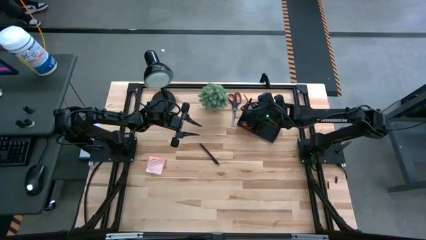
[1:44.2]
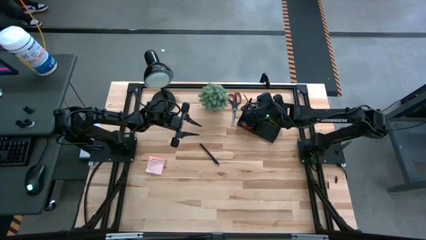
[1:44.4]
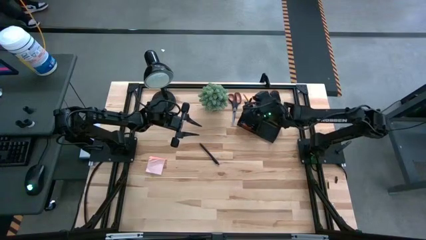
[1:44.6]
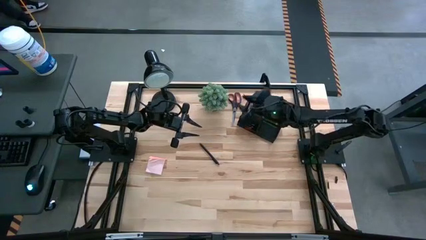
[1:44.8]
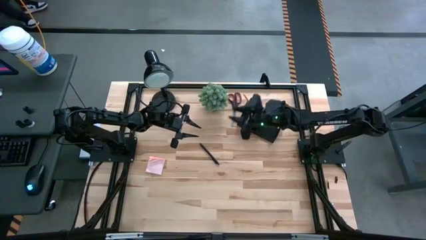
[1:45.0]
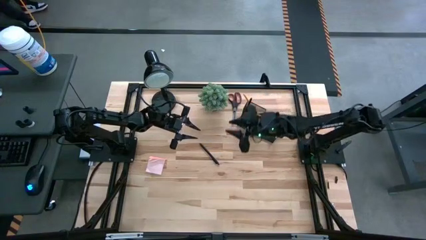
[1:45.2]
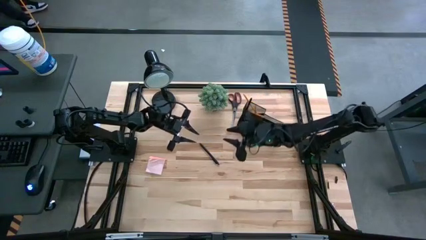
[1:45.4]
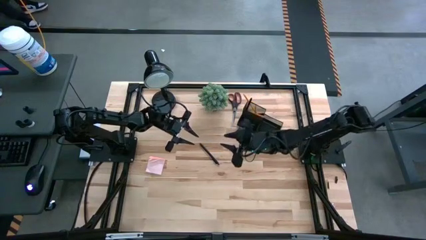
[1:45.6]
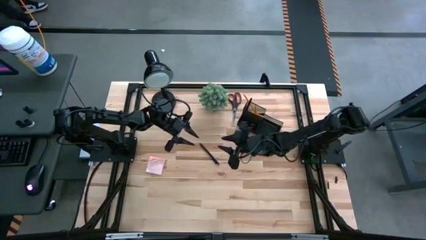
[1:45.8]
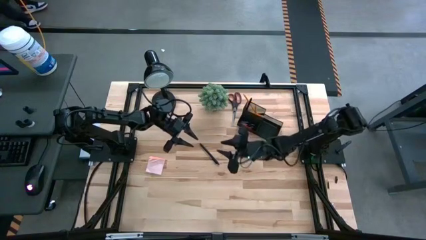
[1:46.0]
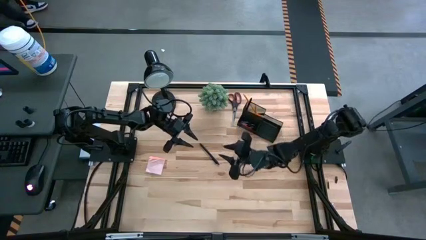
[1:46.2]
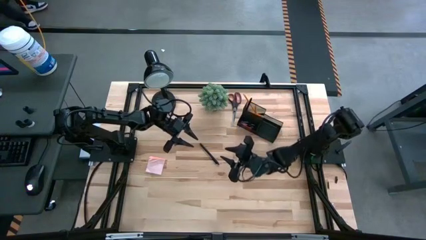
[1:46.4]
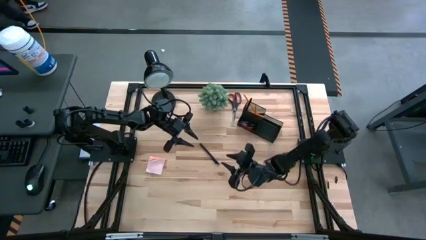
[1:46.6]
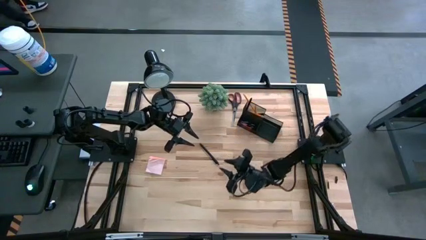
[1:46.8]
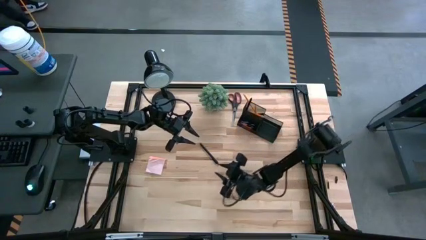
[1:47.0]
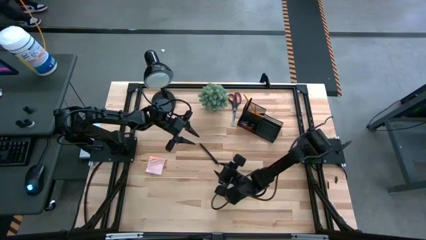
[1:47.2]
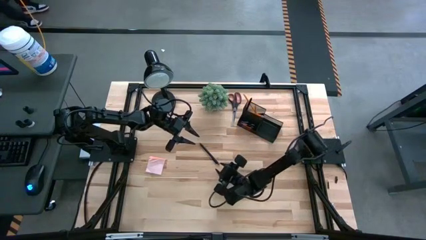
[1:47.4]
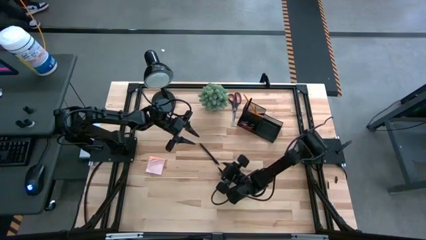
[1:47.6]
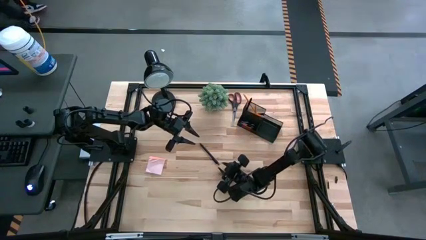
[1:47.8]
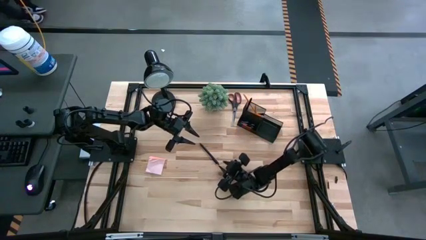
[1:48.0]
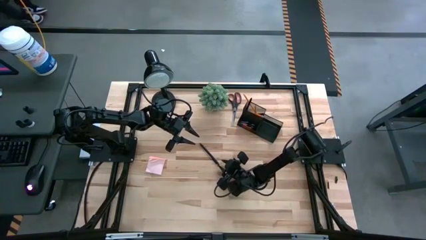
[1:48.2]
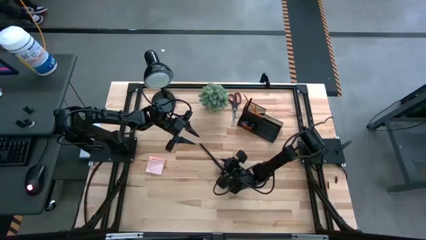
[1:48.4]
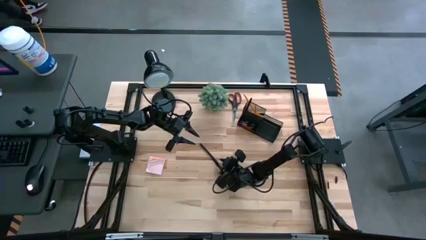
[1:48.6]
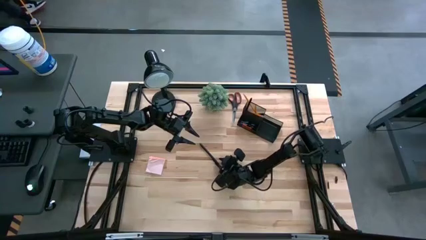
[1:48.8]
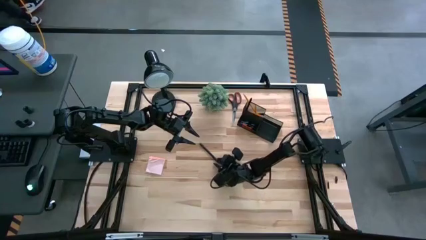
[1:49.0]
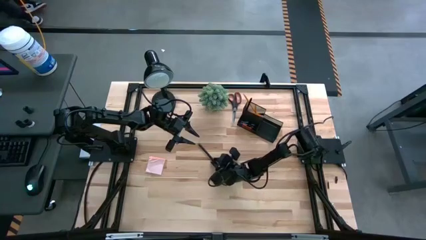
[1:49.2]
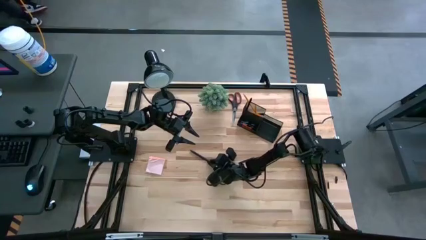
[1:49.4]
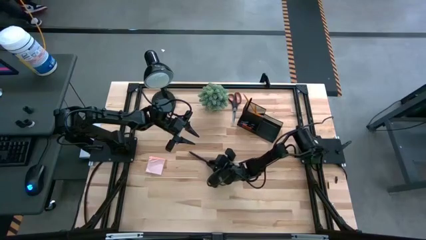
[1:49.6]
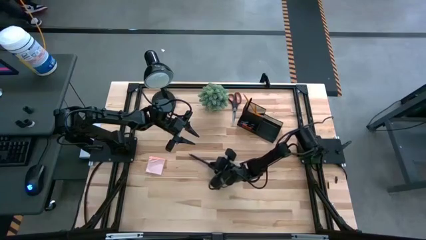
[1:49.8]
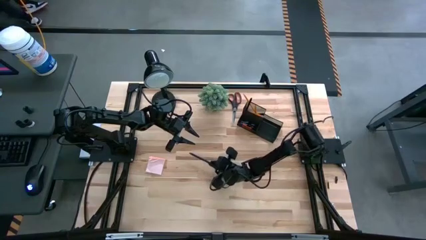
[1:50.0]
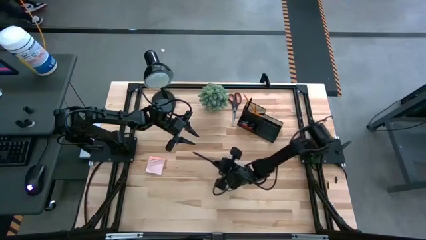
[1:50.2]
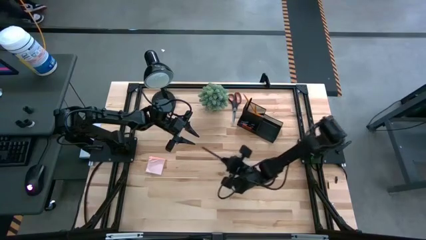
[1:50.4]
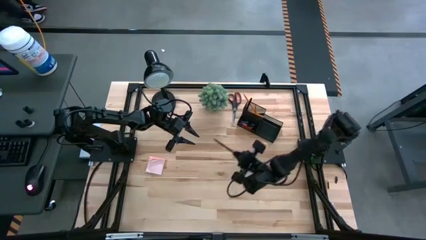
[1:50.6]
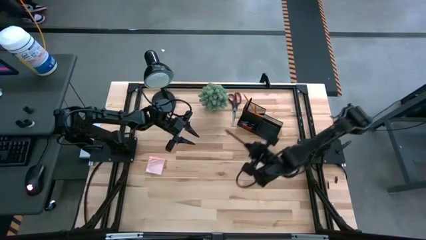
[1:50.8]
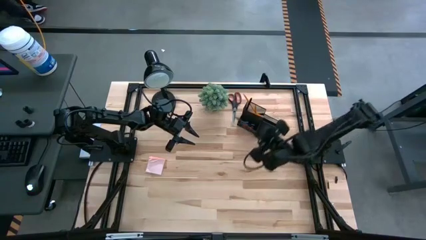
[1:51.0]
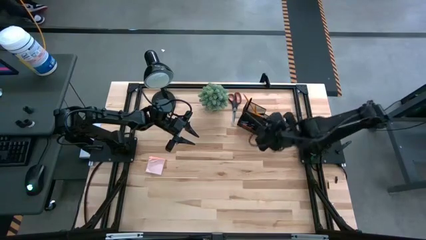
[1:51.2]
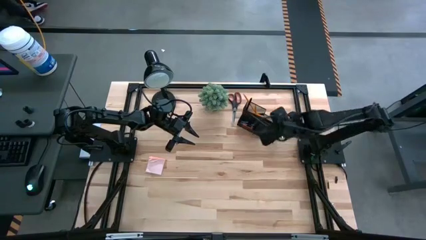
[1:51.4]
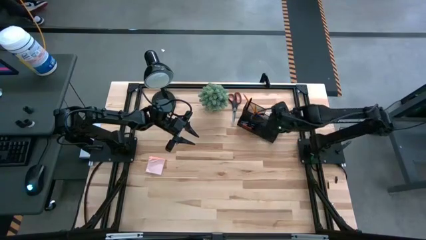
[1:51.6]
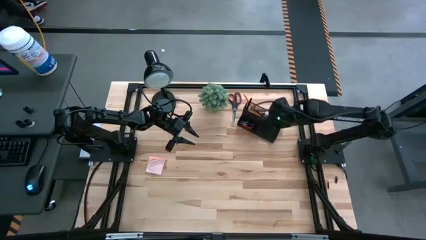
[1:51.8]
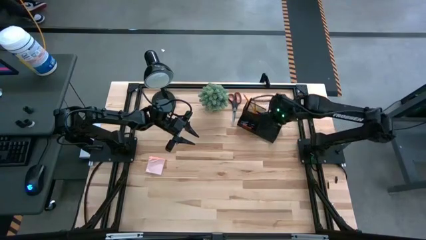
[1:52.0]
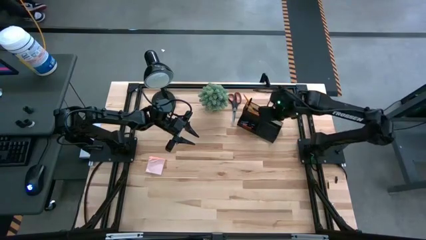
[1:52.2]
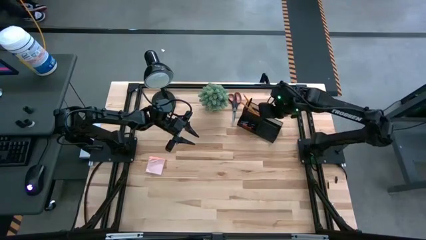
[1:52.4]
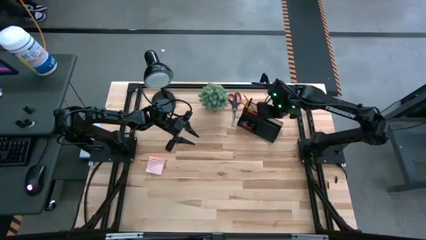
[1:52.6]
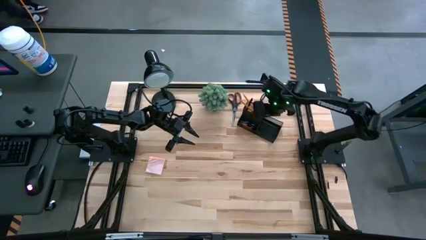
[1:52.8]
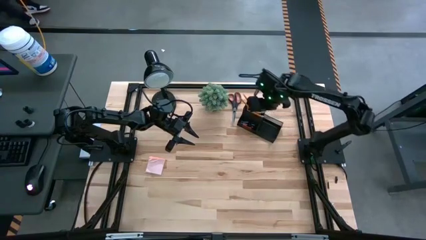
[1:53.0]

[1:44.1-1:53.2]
Task: Pick and place office supplies into organizer
Put the black pen into the black desk organizer

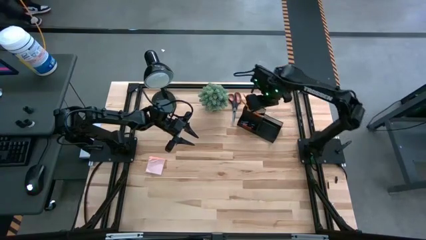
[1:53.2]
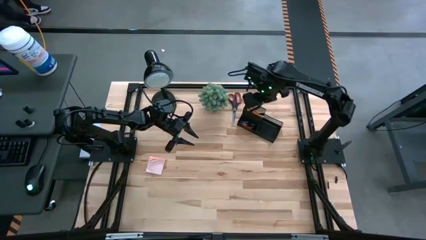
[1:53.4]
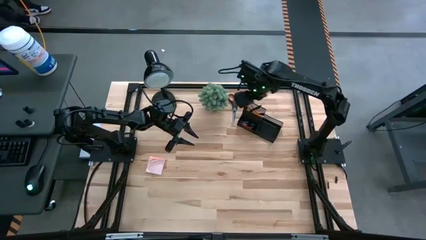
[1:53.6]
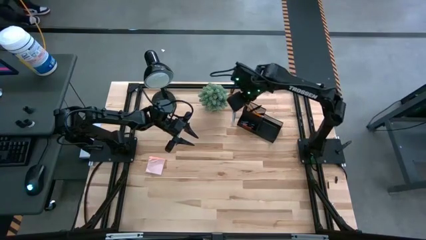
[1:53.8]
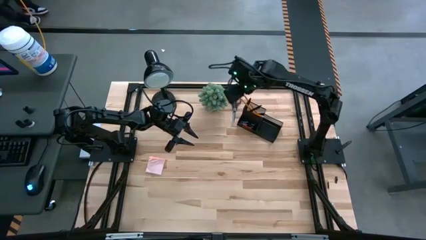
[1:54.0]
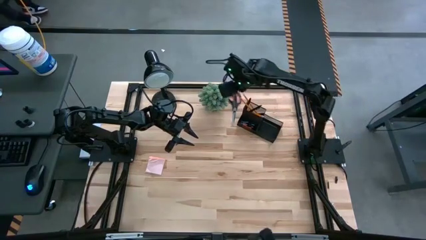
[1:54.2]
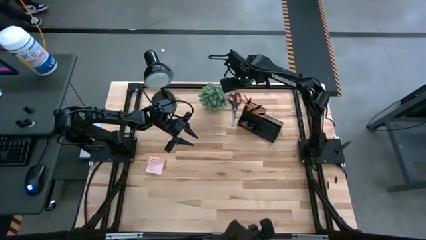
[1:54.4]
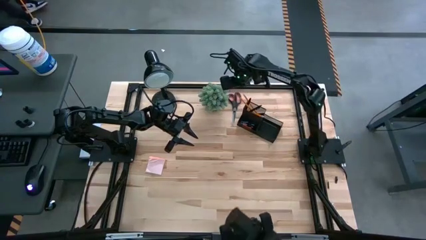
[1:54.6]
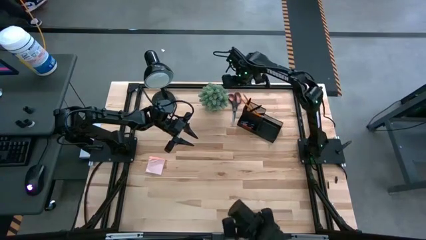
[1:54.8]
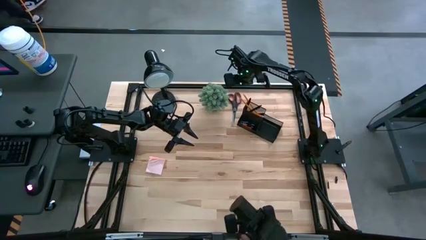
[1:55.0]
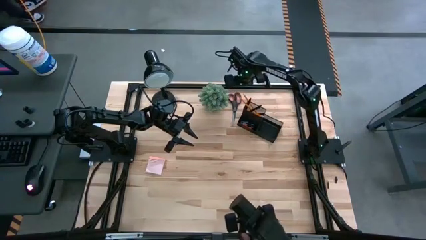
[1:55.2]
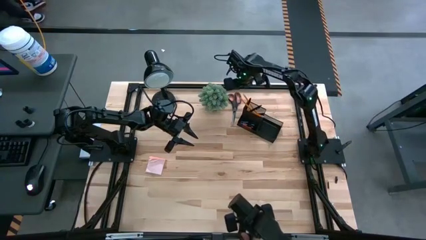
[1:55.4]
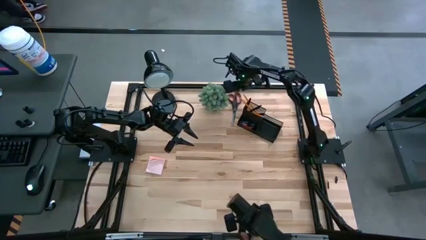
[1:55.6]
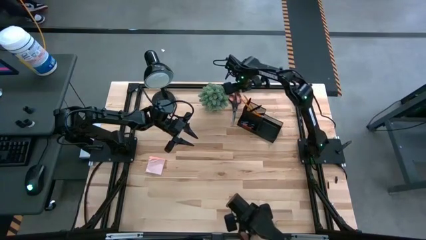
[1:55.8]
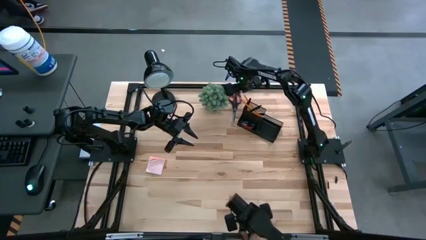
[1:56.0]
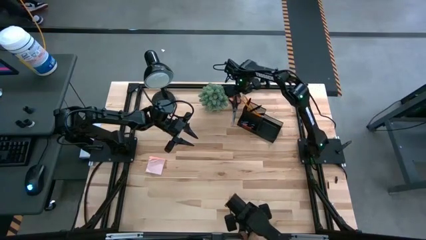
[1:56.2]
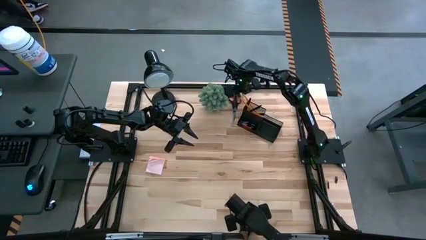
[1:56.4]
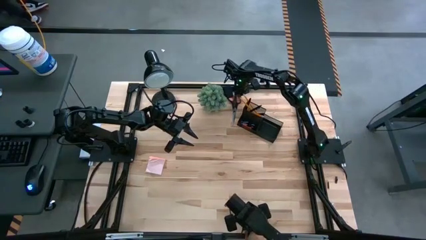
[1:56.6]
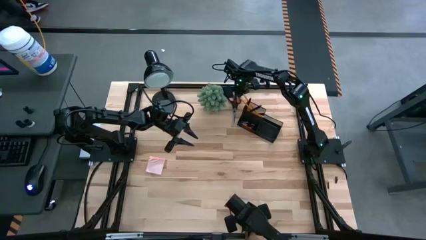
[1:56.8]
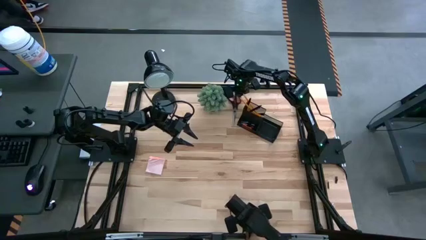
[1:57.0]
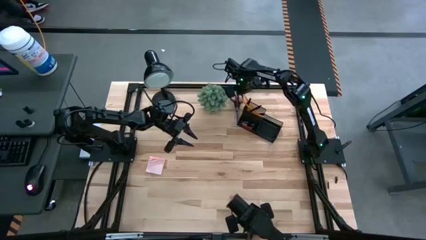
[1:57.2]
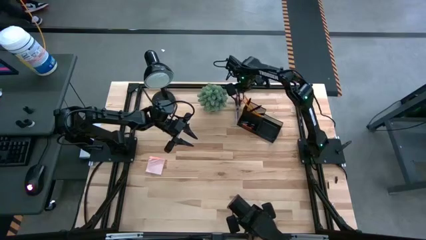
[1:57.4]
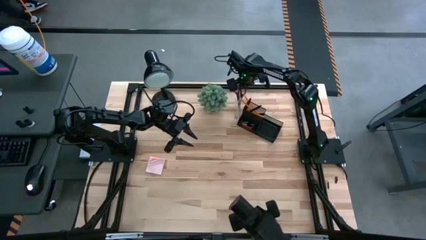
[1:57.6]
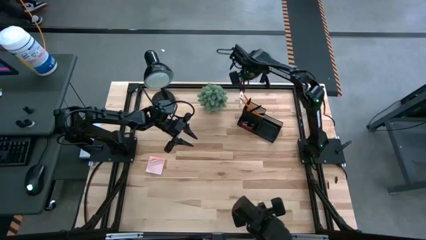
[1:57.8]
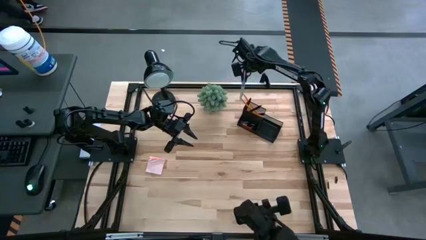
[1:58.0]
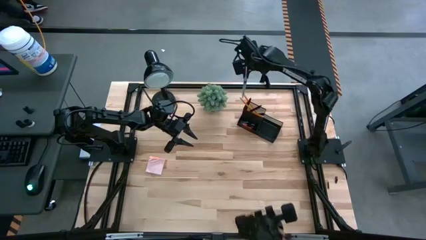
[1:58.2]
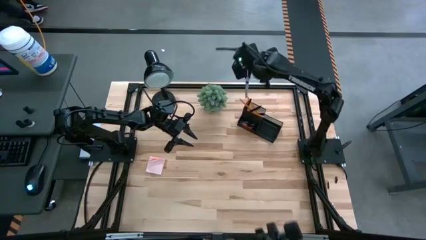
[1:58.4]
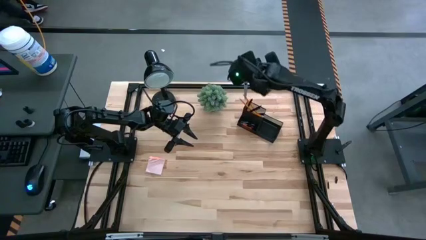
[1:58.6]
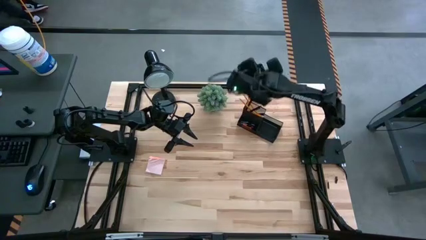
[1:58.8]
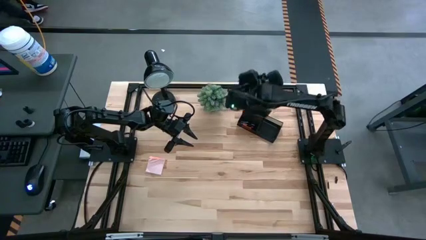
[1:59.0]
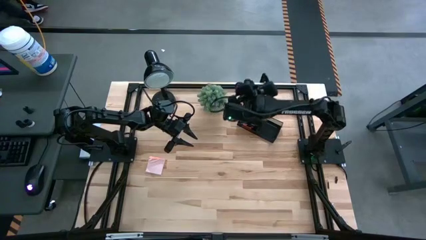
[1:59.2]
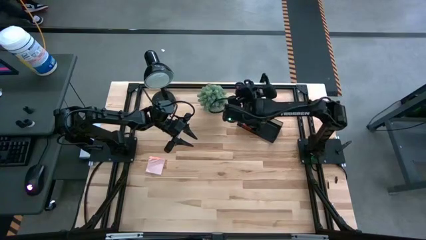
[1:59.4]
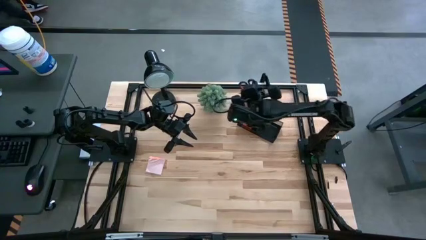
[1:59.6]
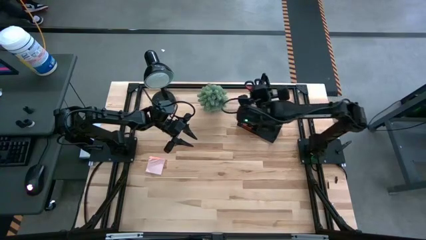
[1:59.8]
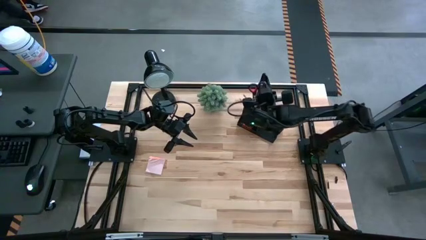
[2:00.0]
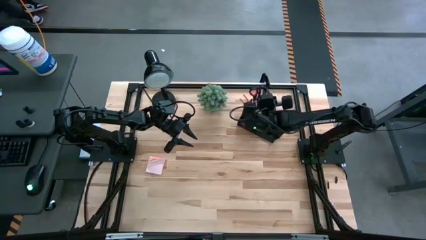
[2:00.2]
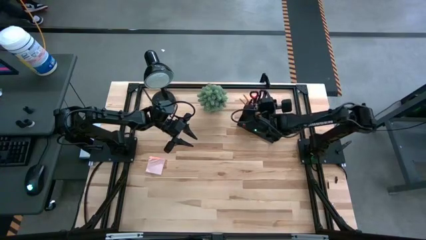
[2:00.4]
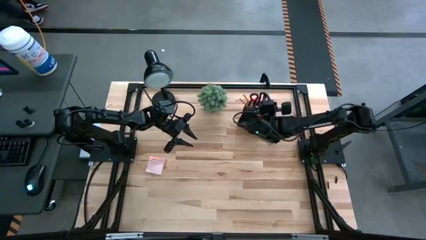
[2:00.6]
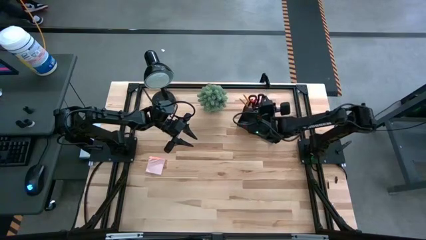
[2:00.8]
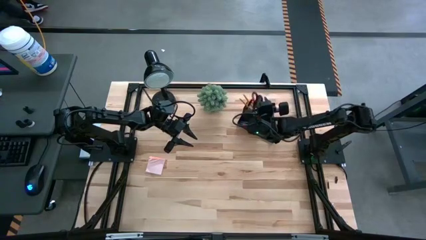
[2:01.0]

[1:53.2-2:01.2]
Put the black scissors into the black desk organizer
